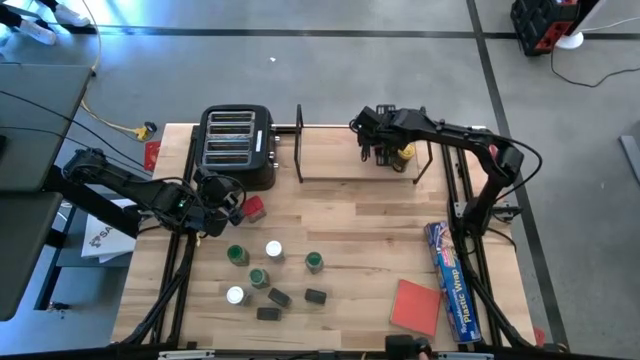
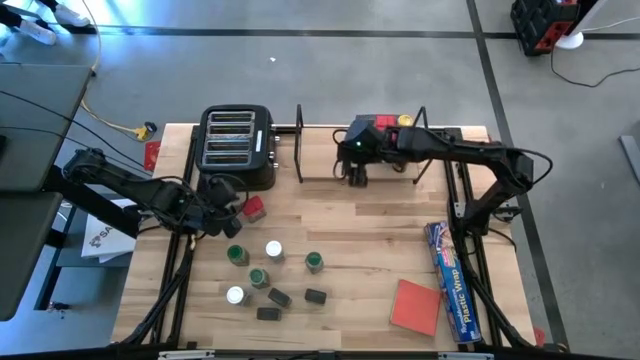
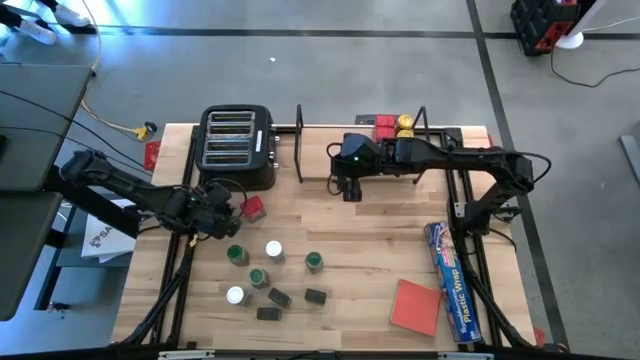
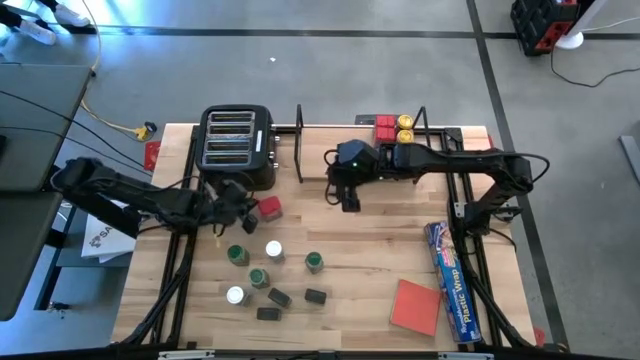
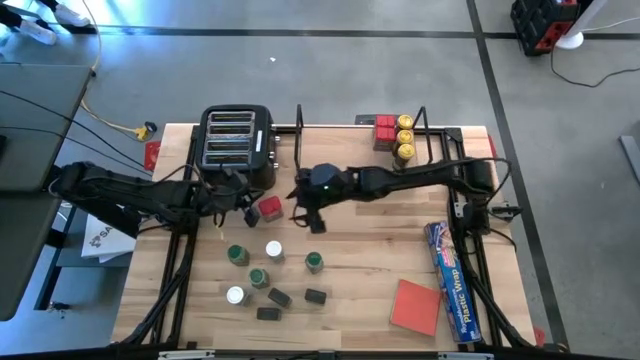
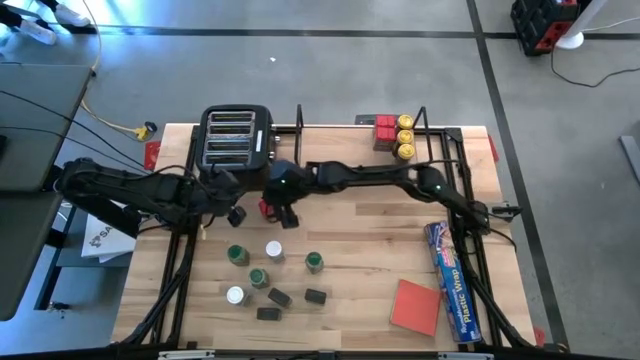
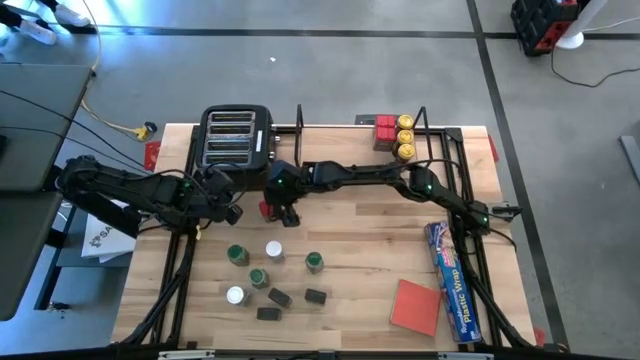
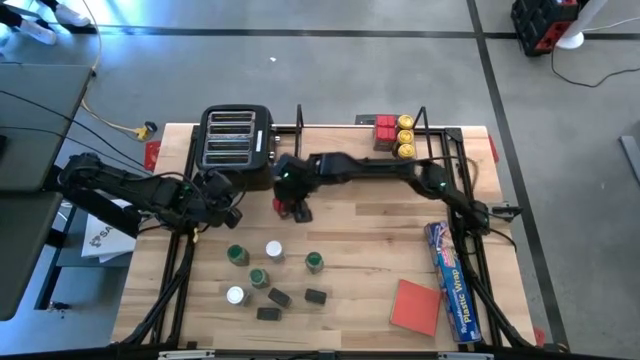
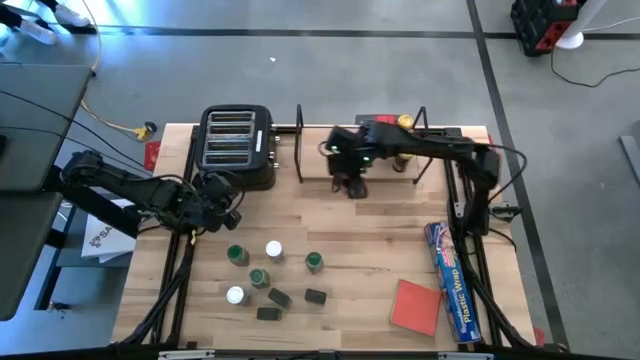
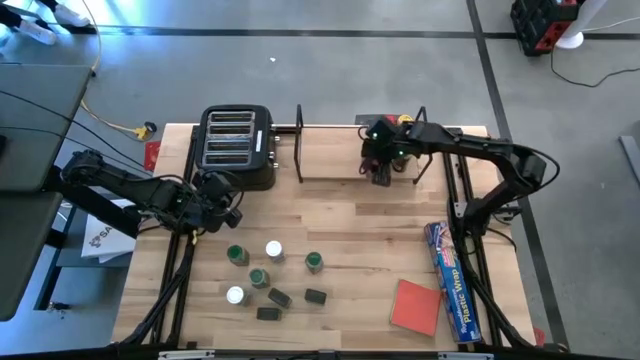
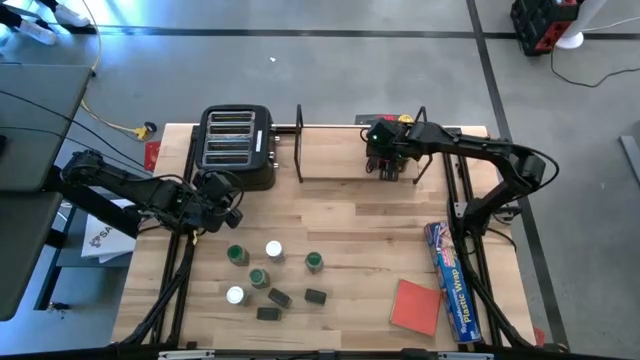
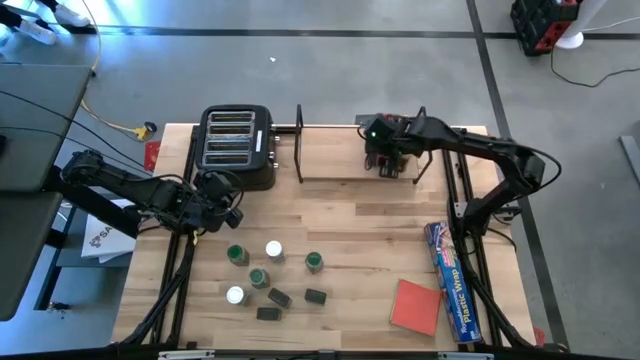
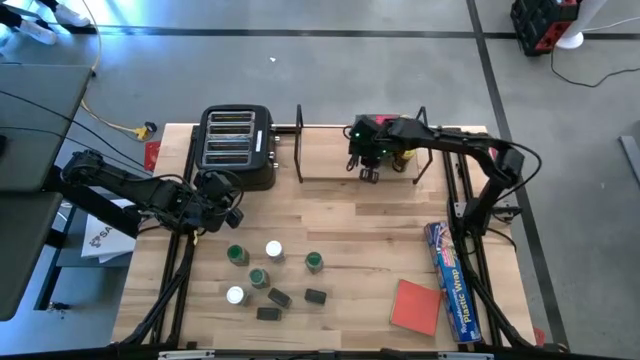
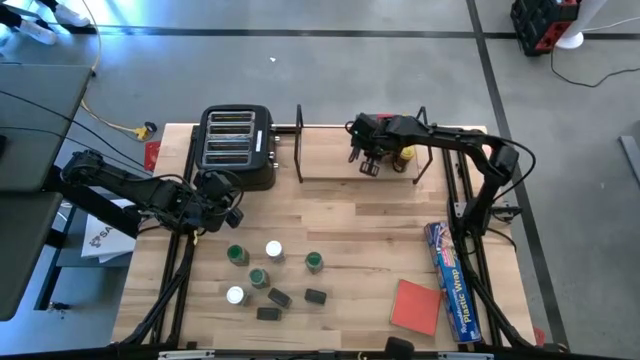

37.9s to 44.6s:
Task: Shelf spices
Put the red seasoning can on the shelf aligned with the other red seasoning cans

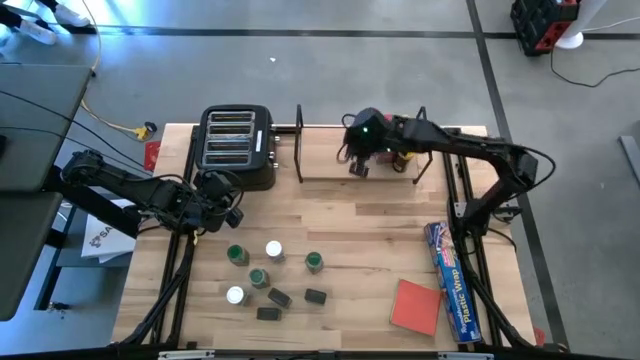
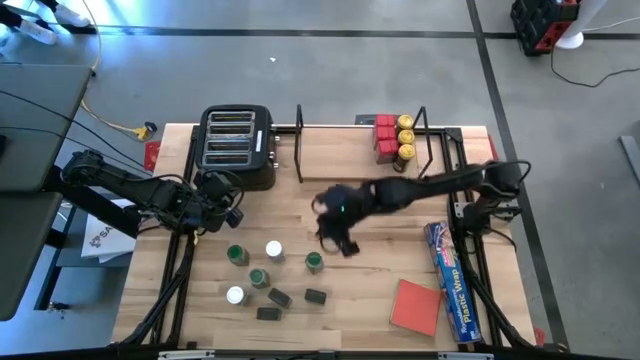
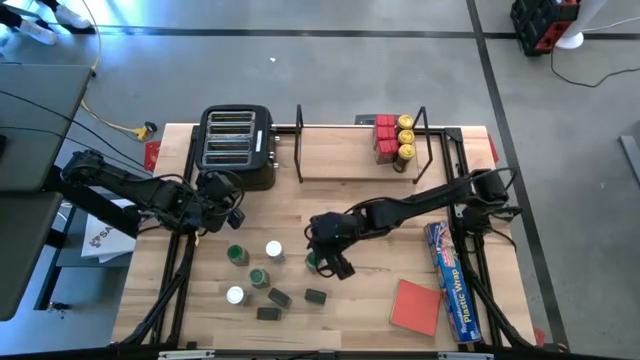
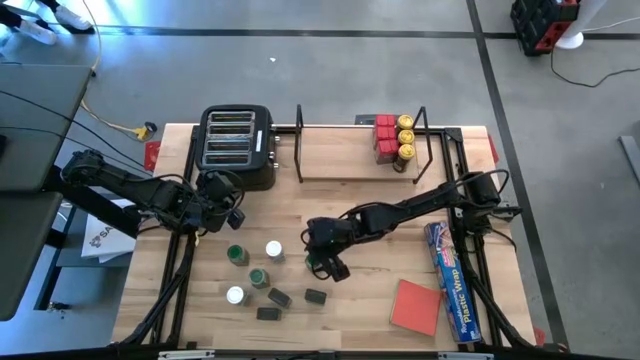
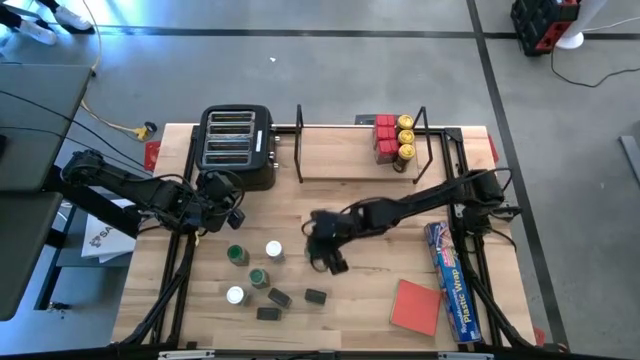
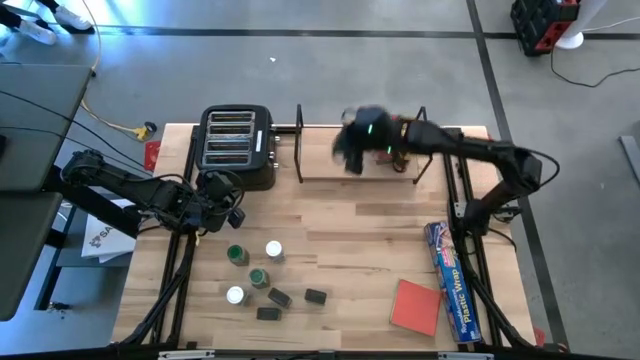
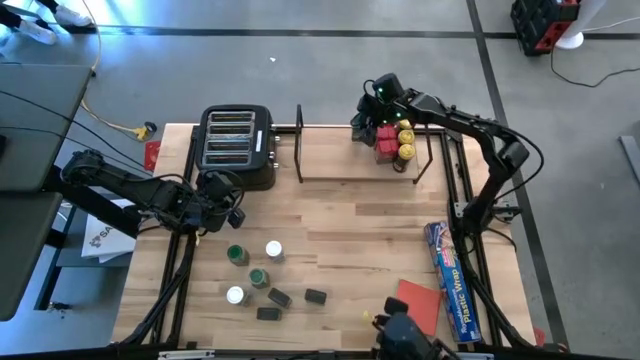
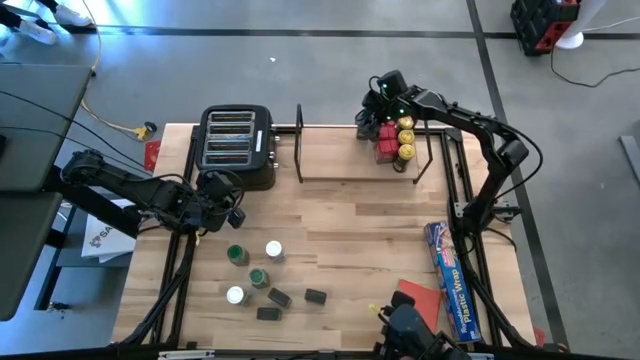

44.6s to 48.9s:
Put the top right green seasoning bottle on the shelf

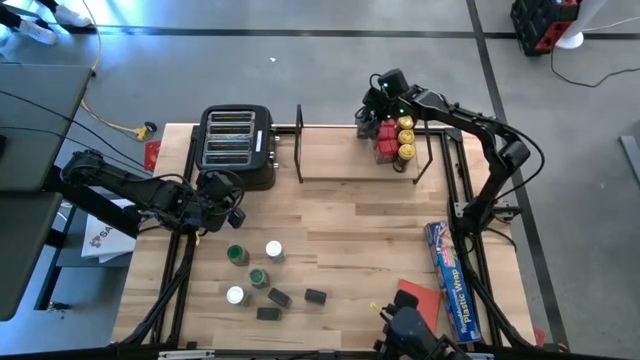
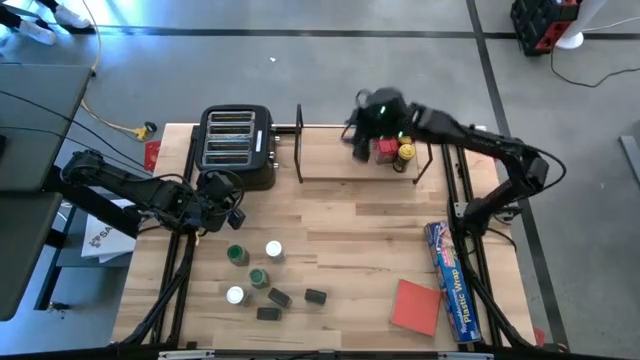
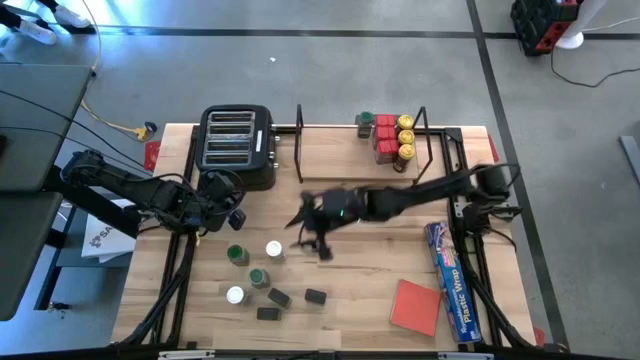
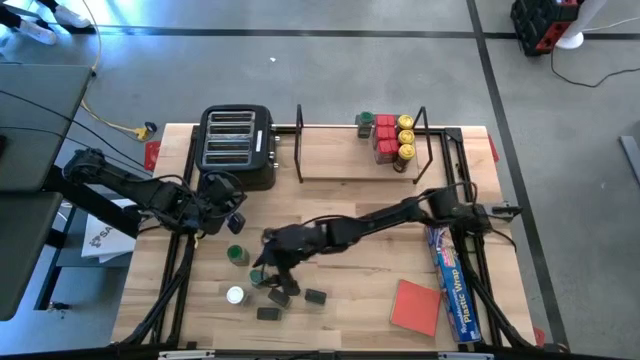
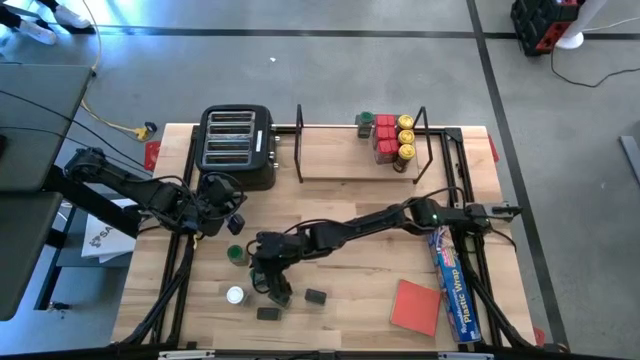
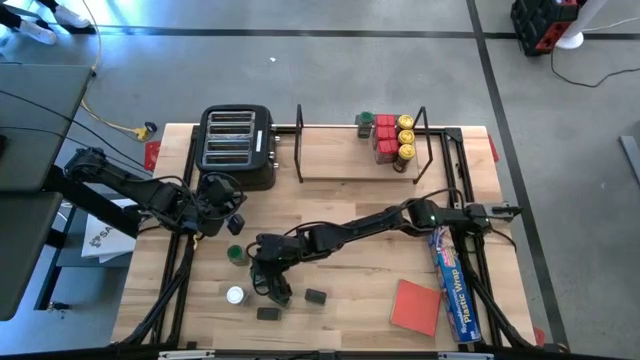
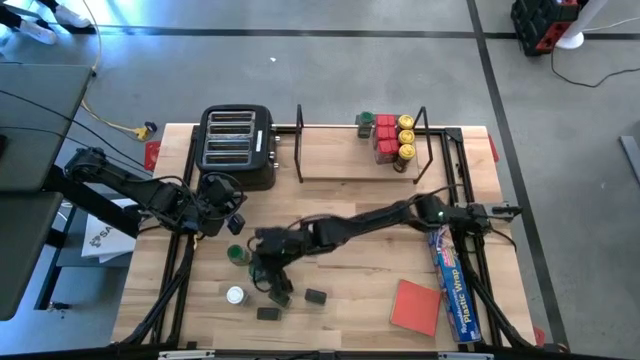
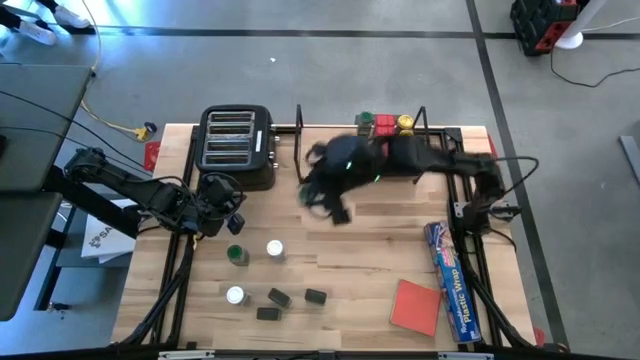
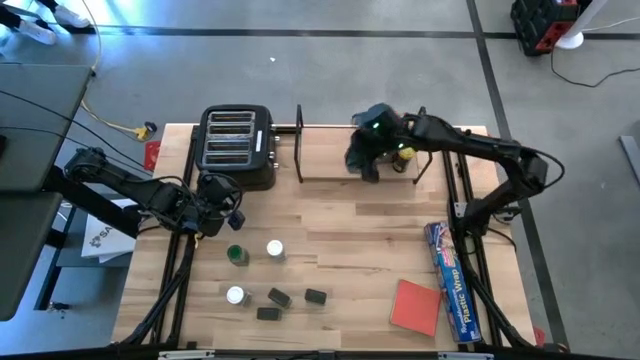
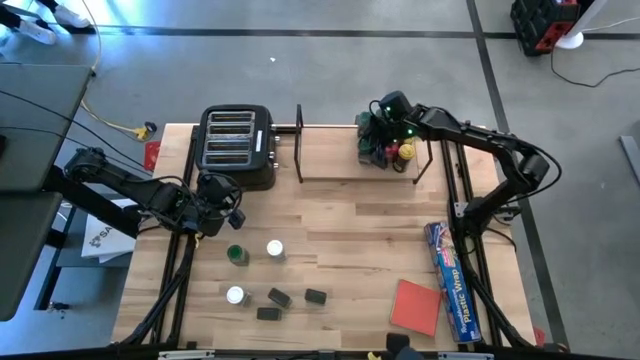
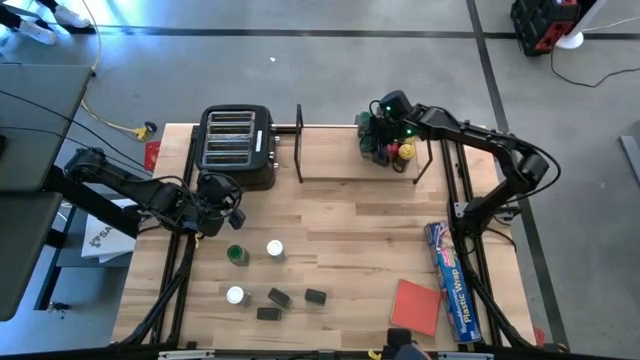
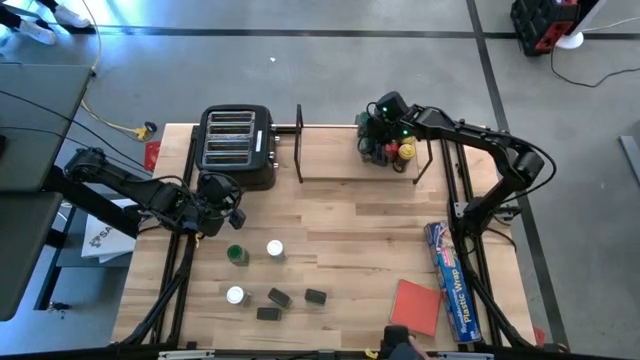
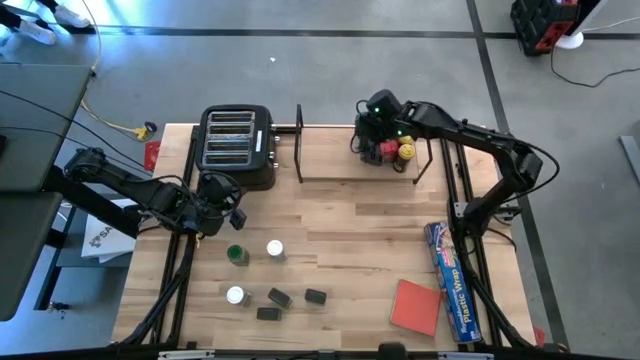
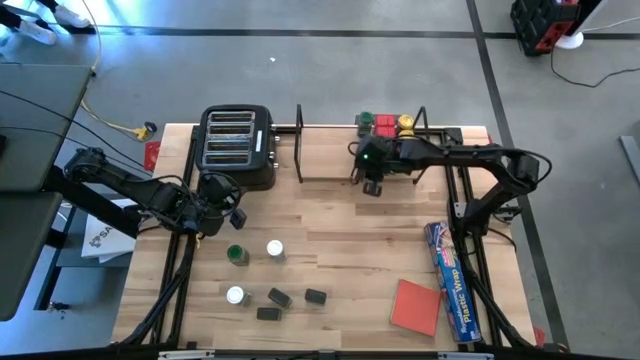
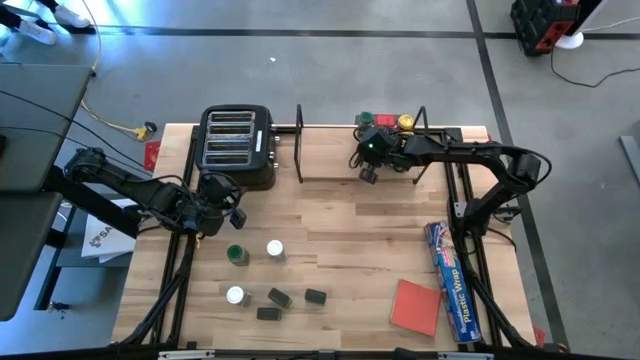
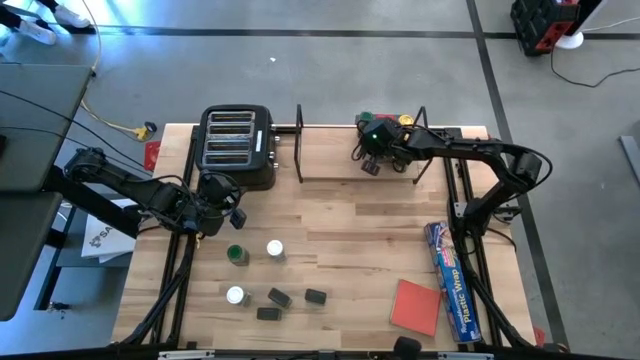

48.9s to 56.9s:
Put the bottom green seasoning bottle on the shelf aligned with the other green seasoning bottle

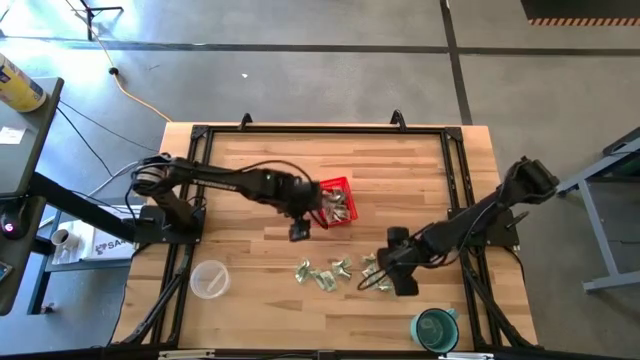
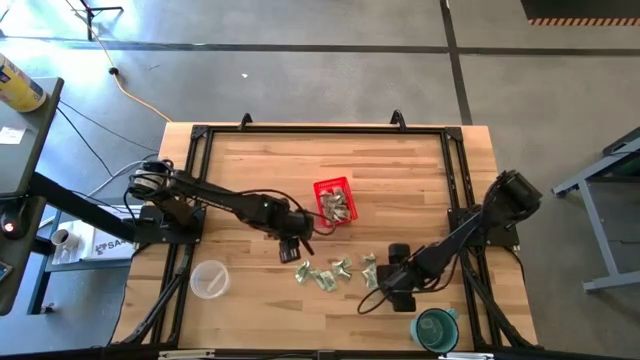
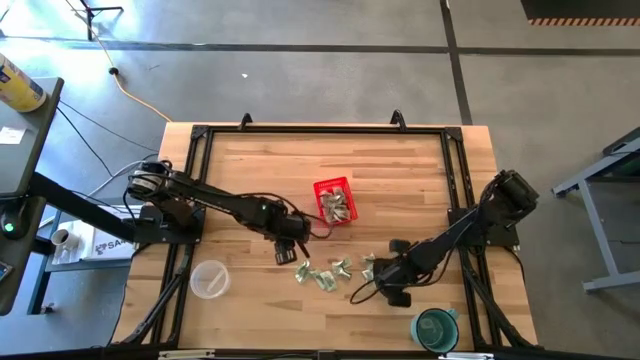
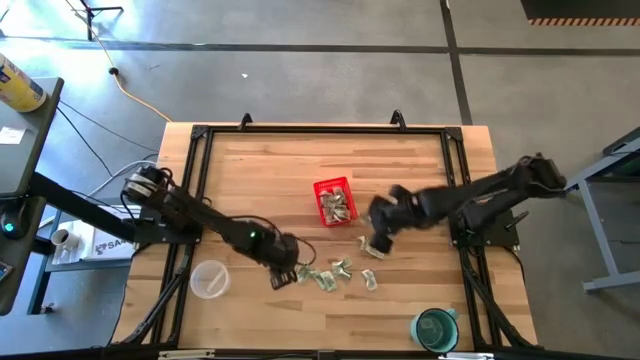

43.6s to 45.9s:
Task: Pick and place items into bin
Put the light green stevia packet into the red bin

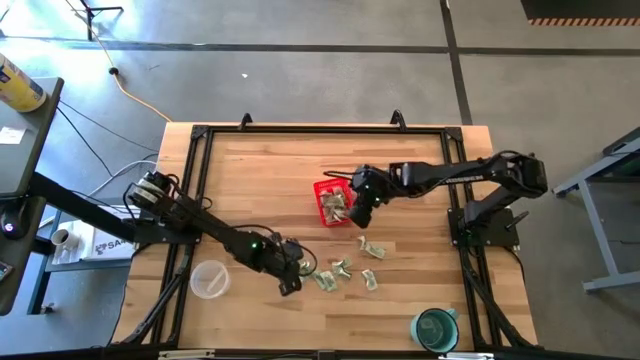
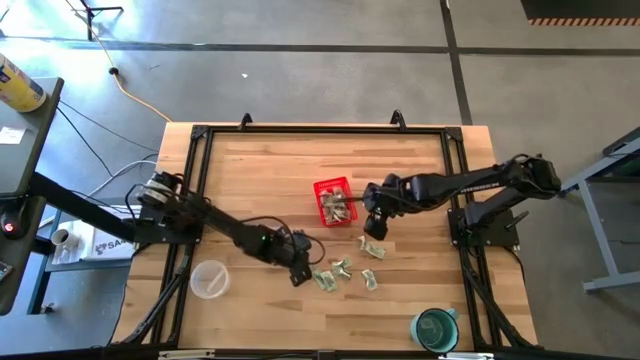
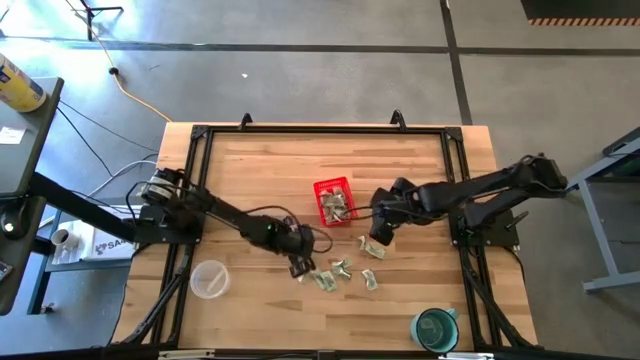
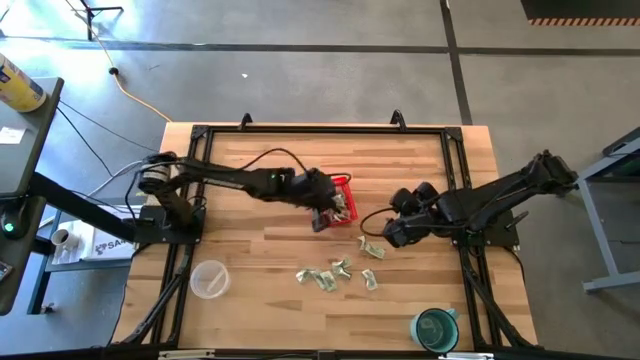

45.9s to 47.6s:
Put the light green stevia packet into the red bin
